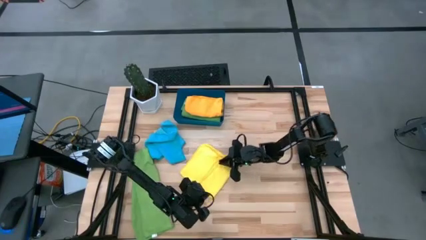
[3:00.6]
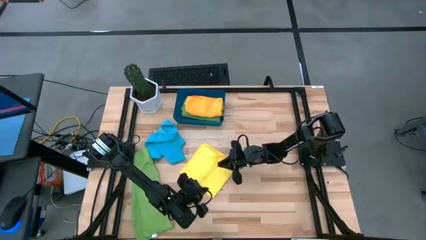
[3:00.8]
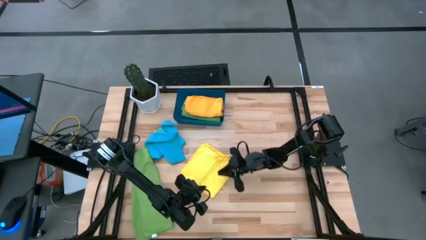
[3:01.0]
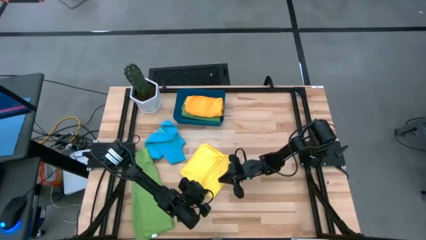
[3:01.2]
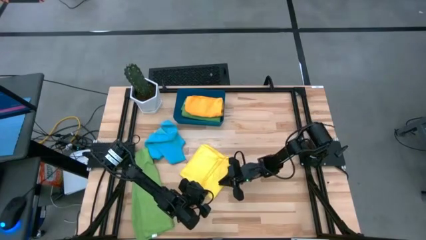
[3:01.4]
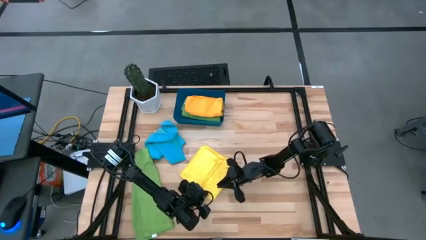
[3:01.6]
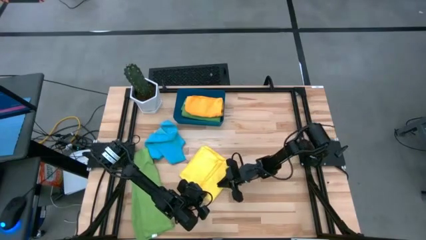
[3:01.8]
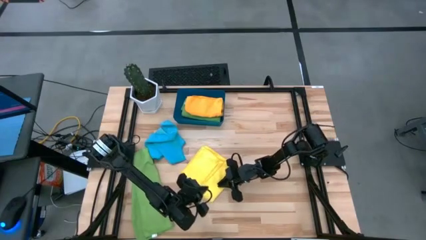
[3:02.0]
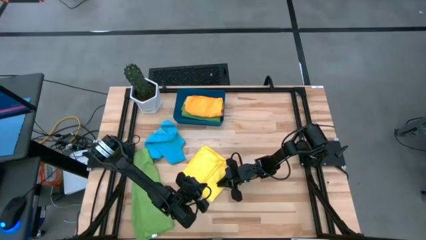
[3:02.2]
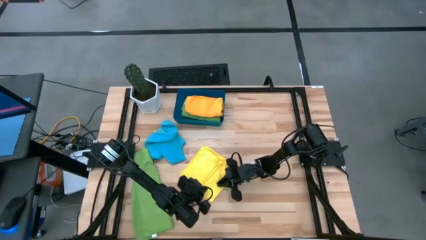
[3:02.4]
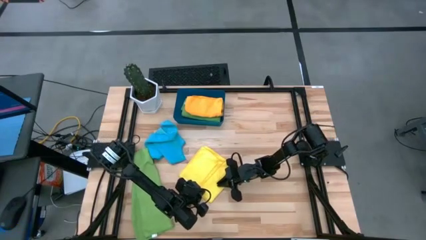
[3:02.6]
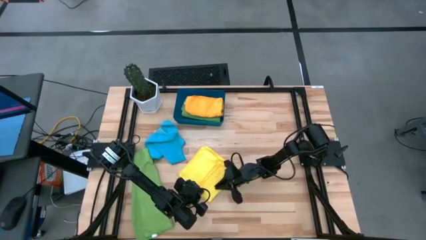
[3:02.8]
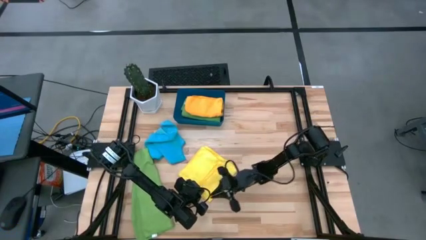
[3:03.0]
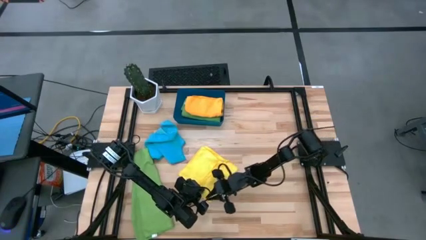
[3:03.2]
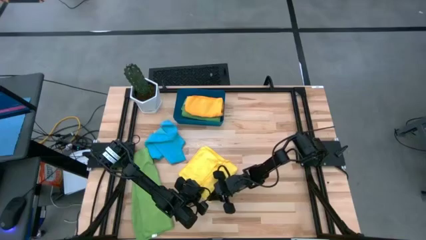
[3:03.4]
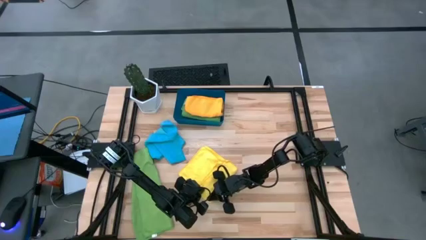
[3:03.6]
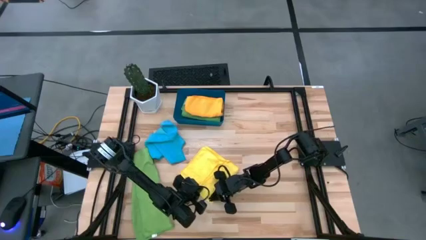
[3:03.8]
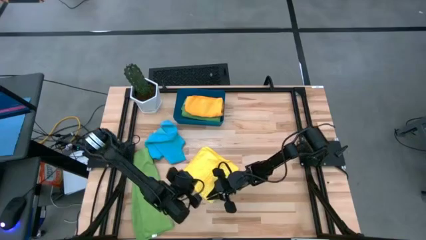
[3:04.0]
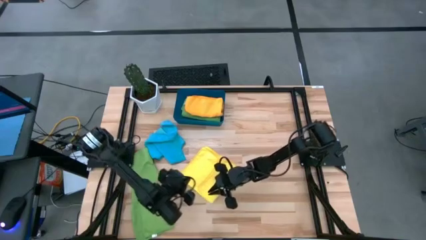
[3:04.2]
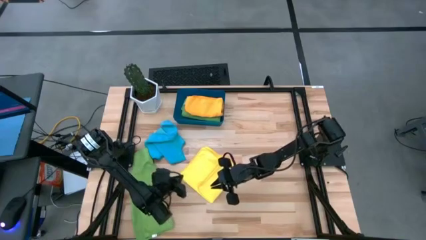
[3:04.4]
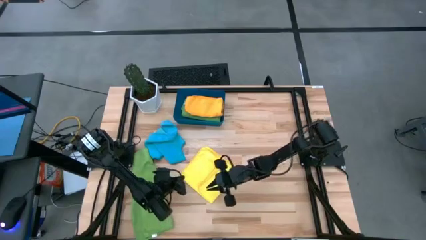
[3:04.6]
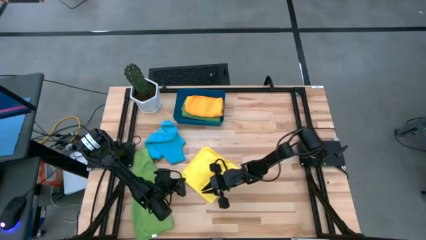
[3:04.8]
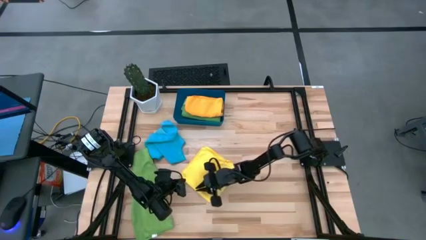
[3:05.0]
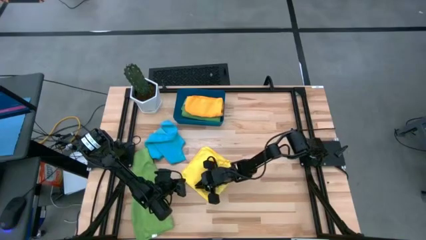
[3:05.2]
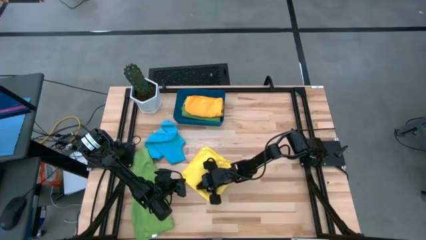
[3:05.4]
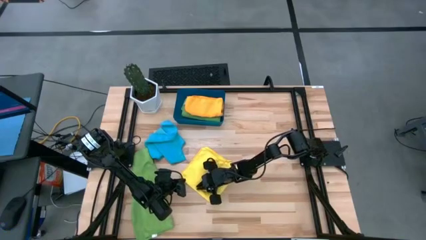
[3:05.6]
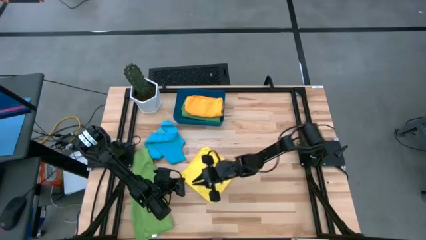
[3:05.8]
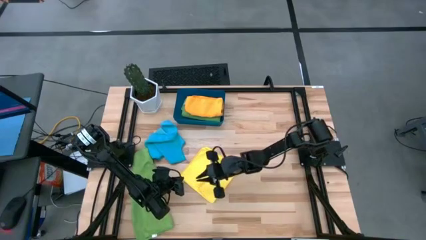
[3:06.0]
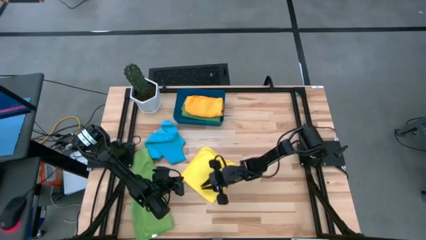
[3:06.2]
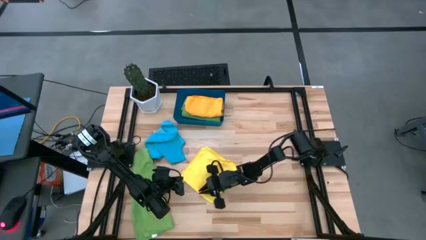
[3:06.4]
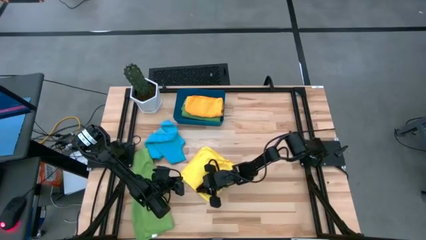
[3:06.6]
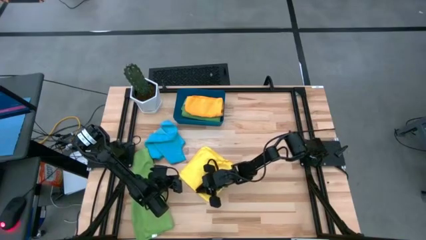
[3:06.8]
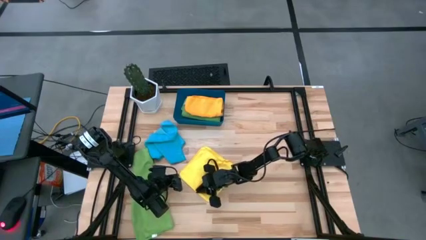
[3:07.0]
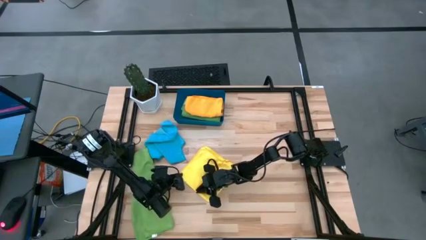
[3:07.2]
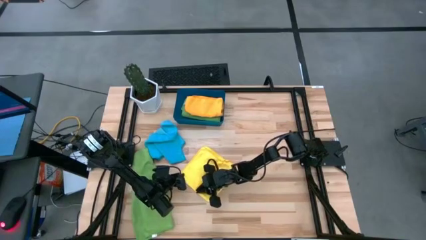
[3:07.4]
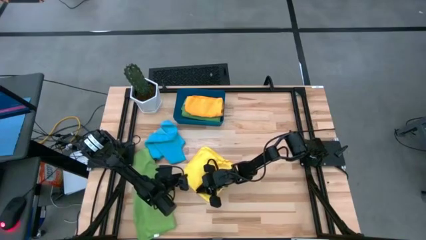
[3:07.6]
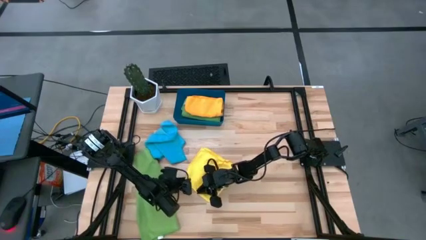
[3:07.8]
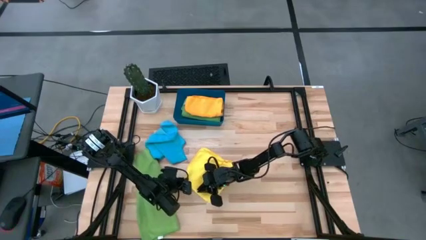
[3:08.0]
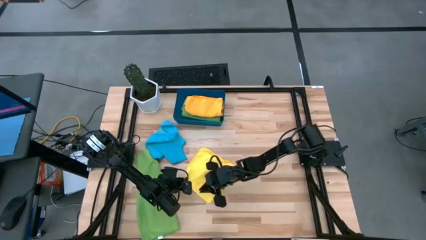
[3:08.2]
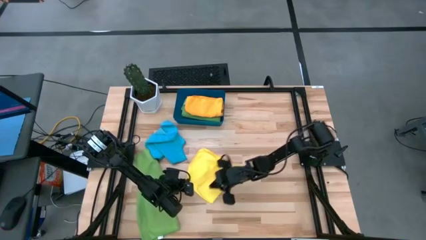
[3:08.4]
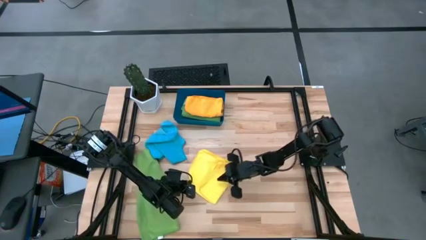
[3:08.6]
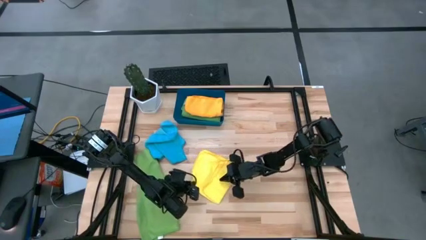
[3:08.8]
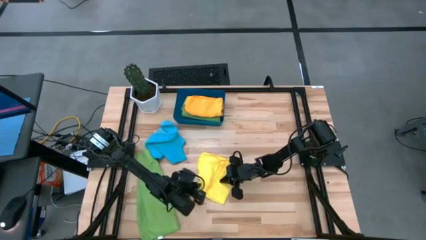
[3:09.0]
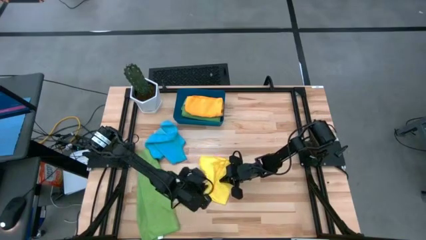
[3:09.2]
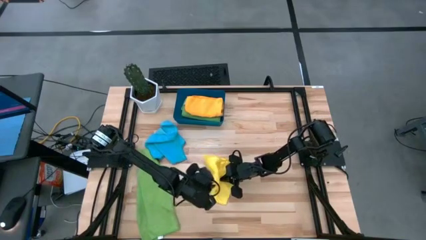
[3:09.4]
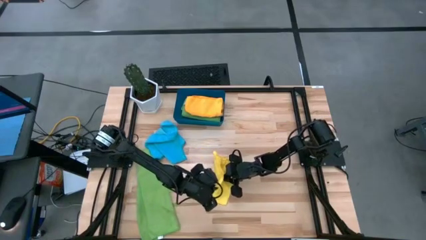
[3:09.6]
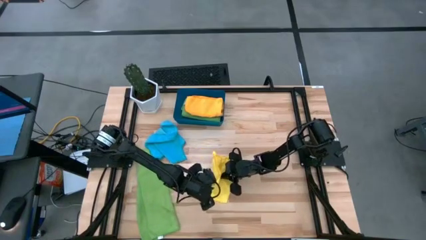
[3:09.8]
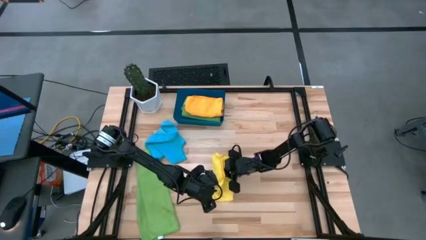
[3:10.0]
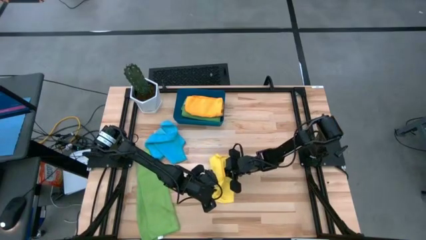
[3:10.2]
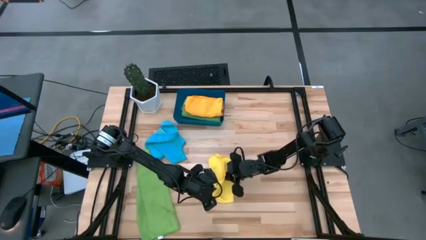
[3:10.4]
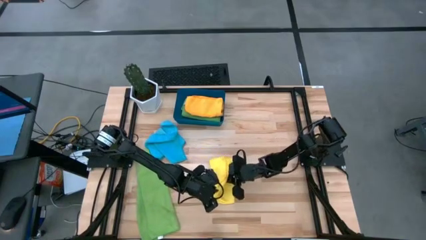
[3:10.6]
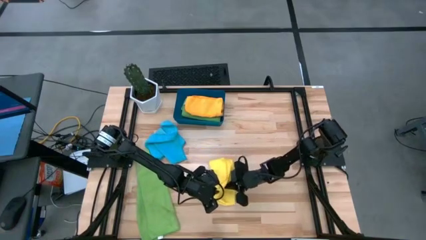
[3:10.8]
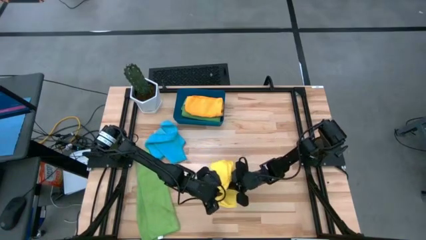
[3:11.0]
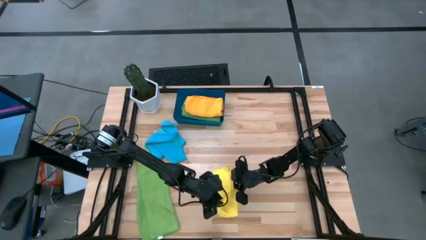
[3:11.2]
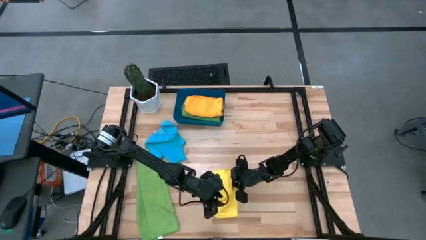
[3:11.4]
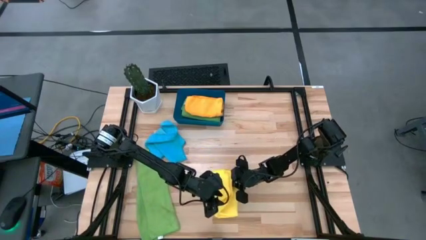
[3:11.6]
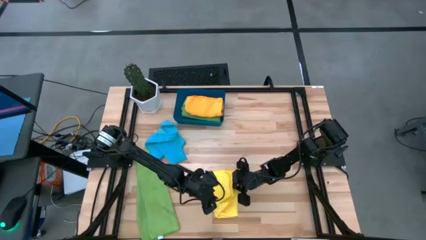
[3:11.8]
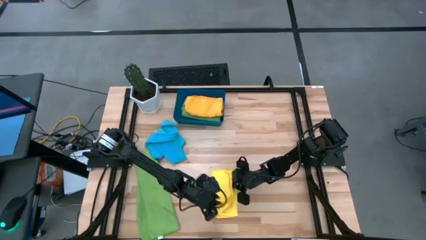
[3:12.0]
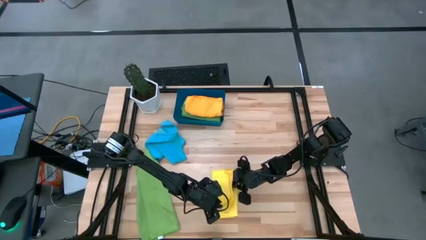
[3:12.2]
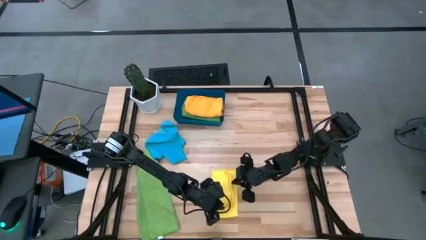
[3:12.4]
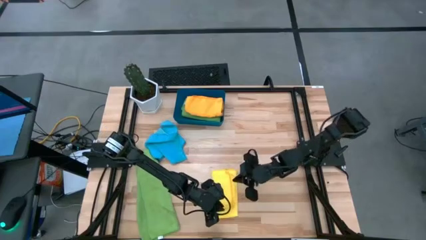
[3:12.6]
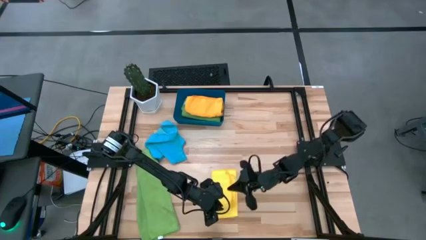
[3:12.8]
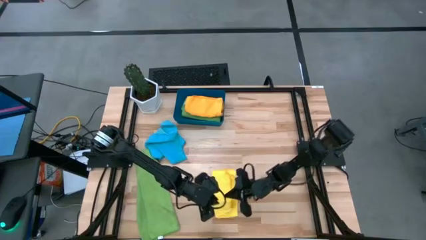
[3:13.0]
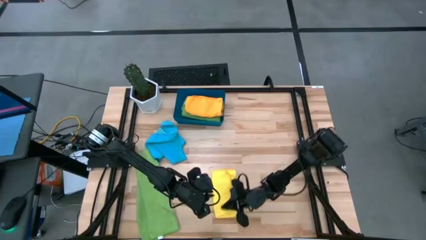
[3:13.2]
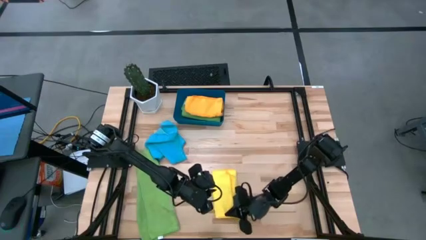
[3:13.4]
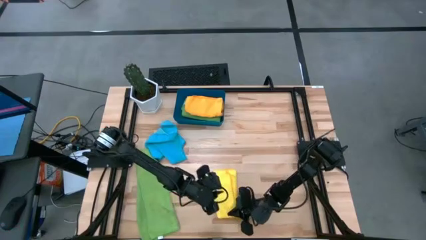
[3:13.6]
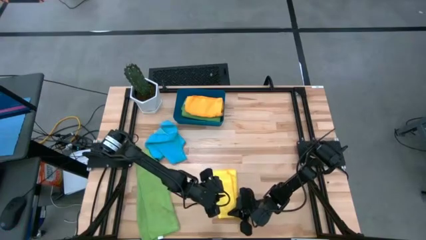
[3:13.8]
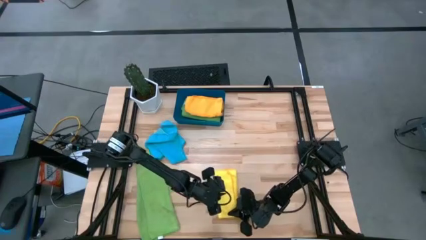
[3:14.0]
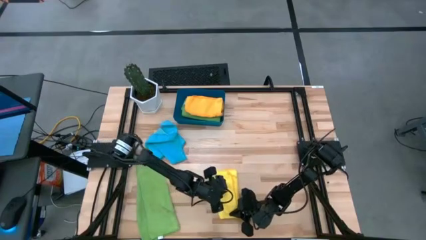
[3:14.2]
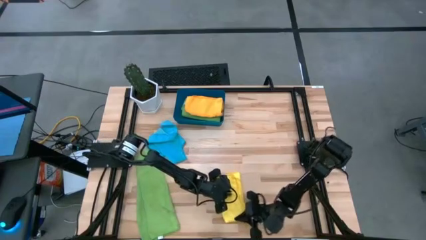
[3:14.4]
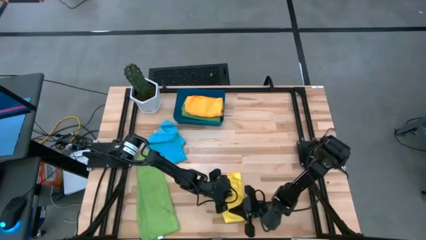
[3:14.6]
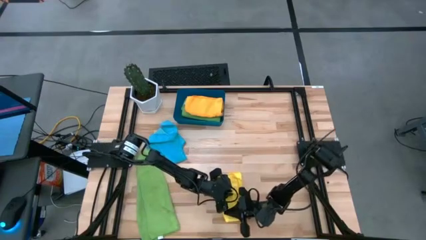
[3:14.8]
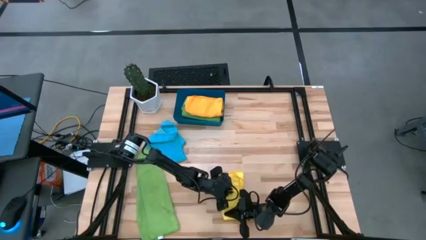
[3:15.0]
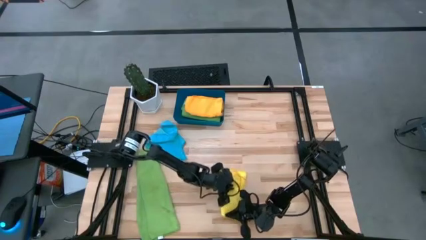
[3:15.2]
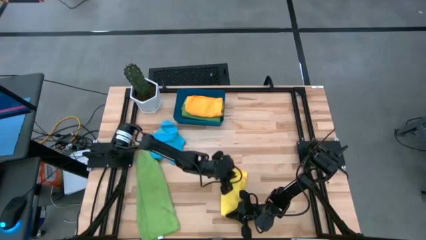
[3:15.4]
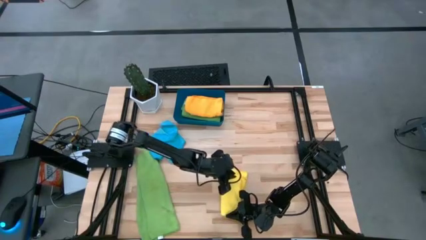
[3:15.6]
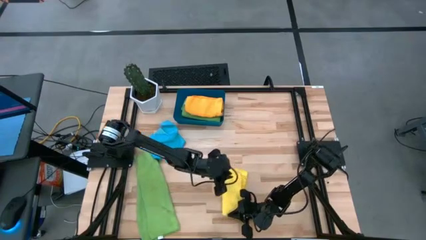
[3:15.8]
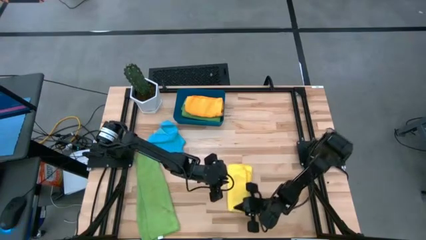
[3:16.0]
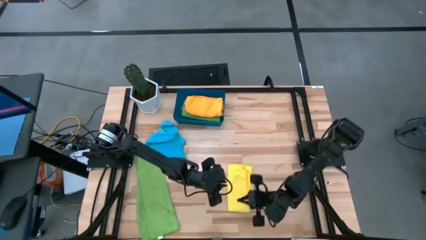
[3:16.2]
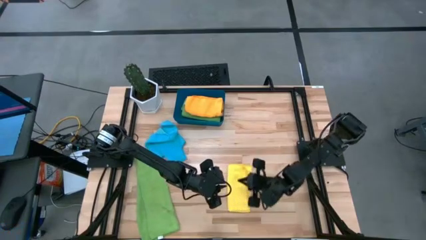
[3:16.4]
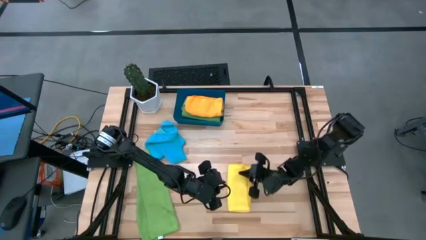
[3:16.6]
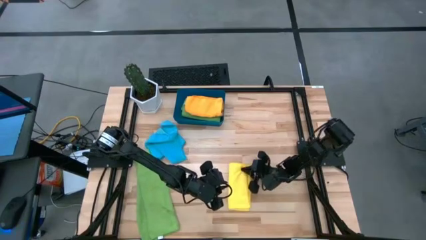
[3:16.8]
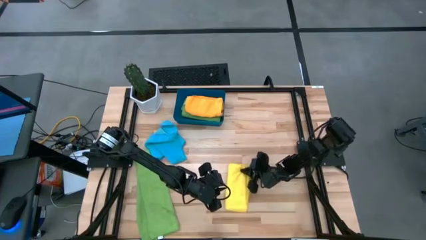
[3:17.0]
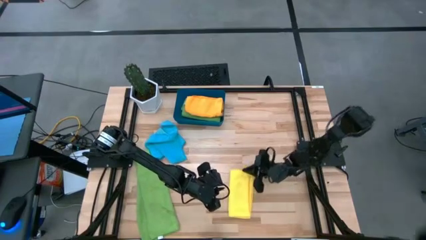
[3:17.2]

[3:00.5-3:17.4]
Task: Fold microfiber towels
Fold the yellow towel
